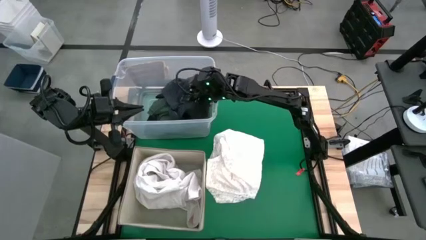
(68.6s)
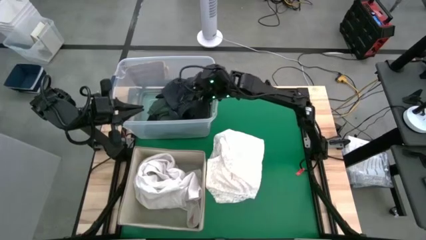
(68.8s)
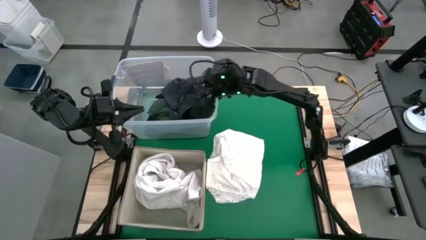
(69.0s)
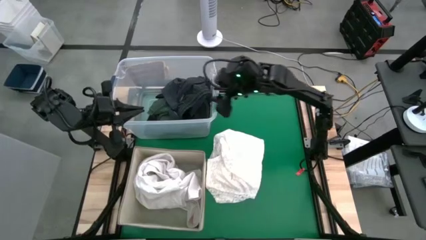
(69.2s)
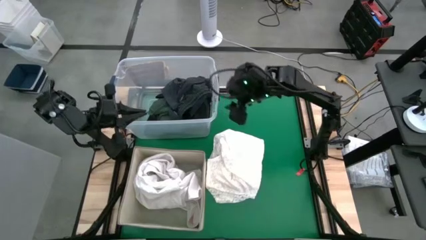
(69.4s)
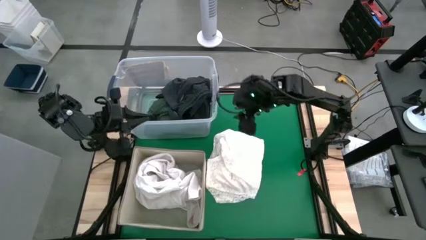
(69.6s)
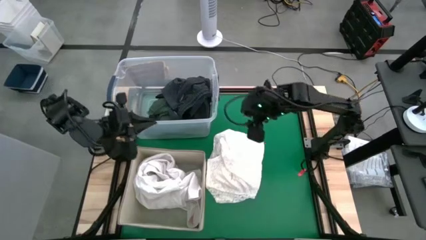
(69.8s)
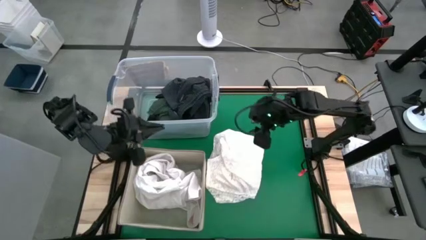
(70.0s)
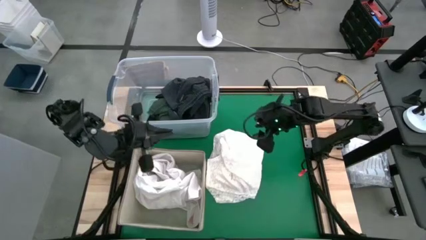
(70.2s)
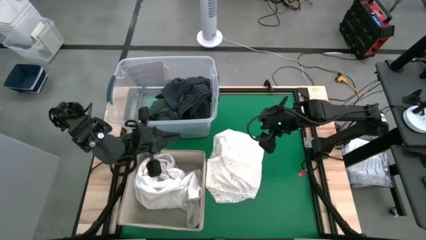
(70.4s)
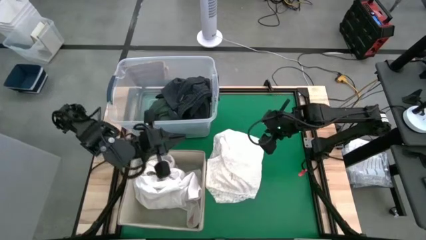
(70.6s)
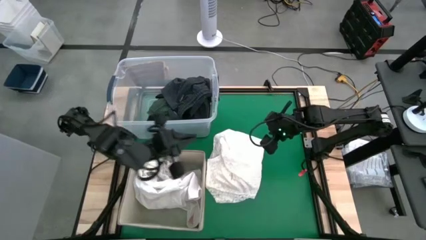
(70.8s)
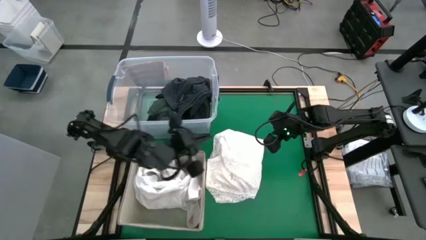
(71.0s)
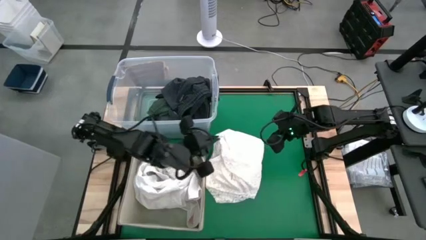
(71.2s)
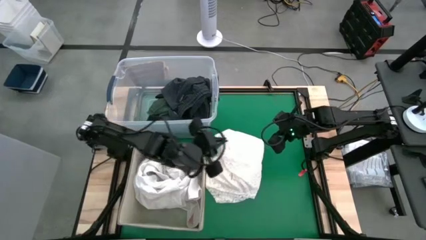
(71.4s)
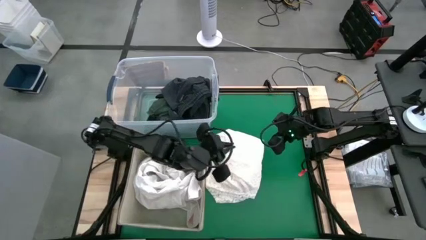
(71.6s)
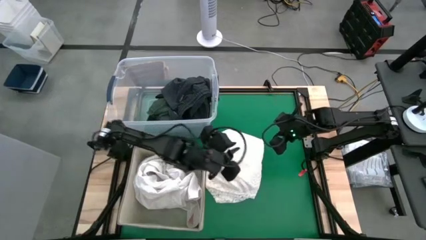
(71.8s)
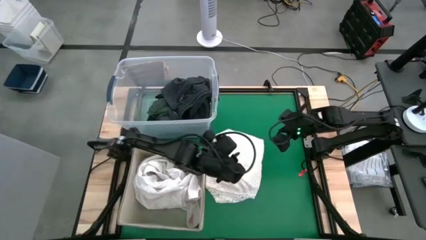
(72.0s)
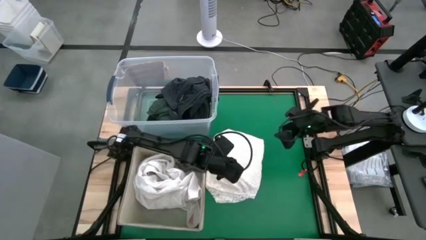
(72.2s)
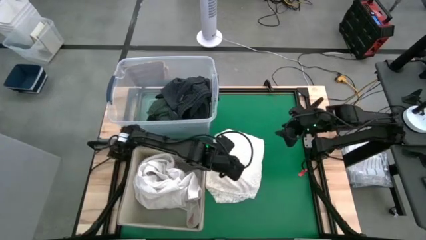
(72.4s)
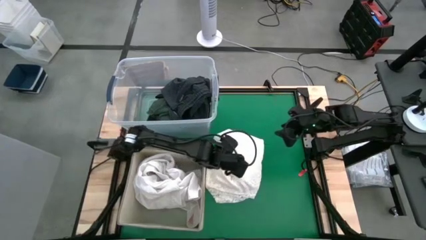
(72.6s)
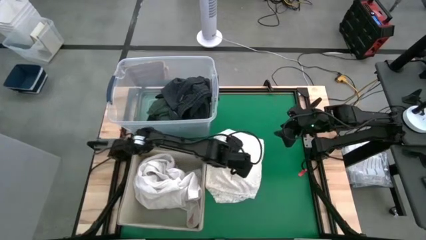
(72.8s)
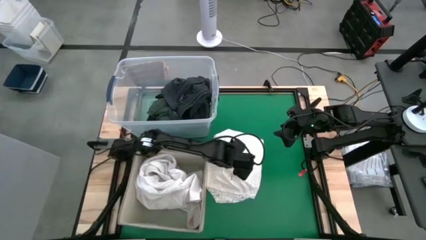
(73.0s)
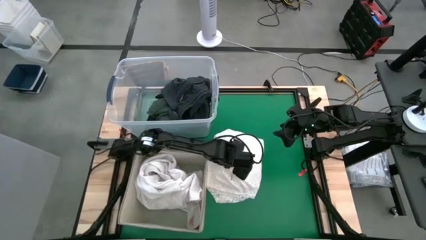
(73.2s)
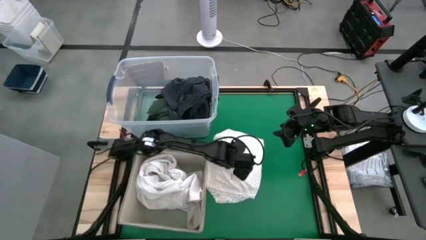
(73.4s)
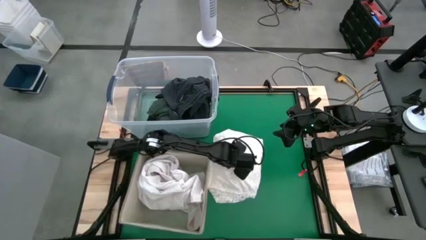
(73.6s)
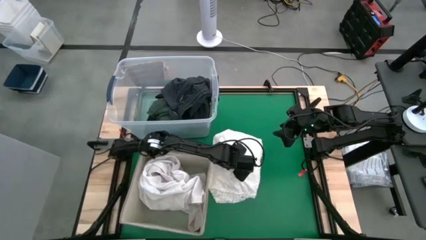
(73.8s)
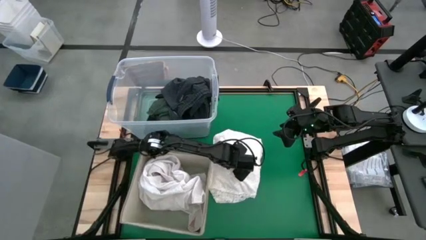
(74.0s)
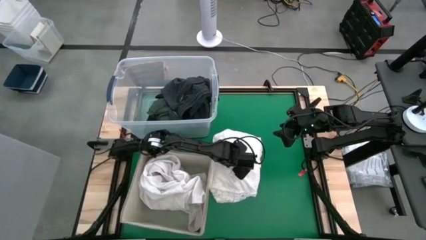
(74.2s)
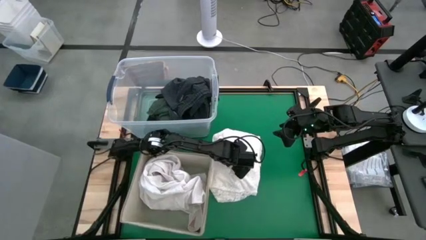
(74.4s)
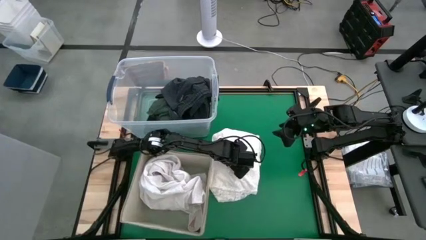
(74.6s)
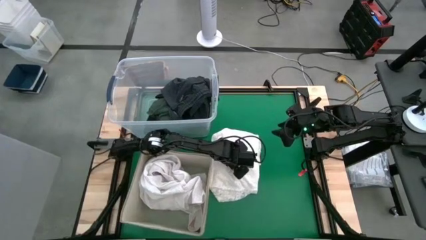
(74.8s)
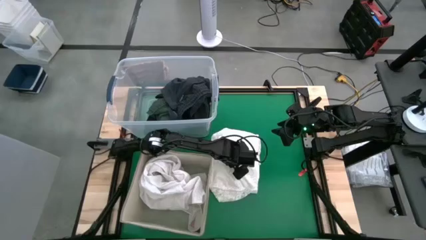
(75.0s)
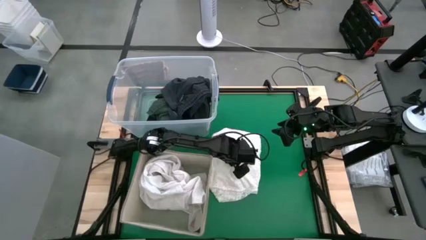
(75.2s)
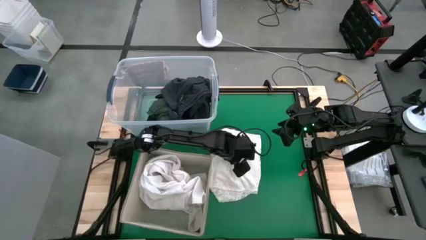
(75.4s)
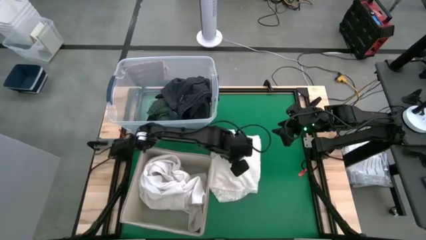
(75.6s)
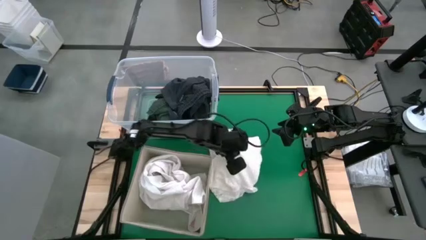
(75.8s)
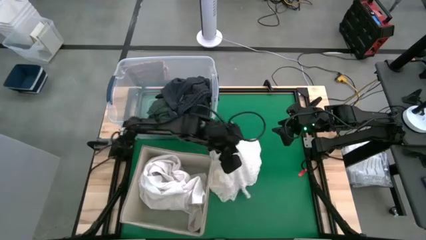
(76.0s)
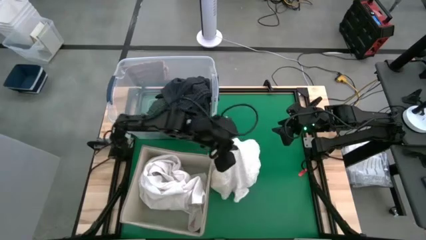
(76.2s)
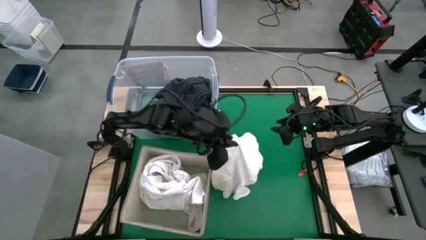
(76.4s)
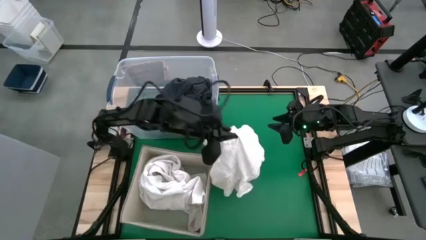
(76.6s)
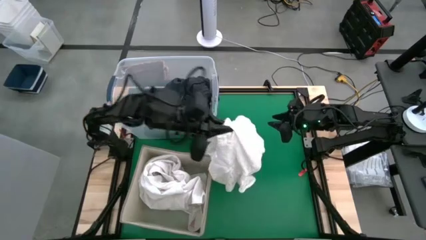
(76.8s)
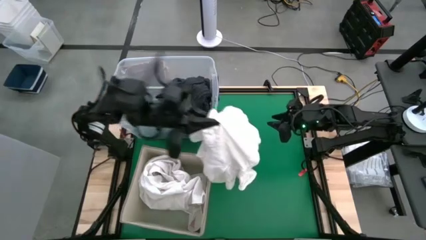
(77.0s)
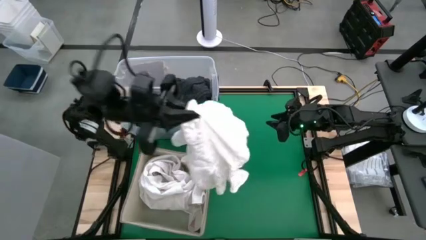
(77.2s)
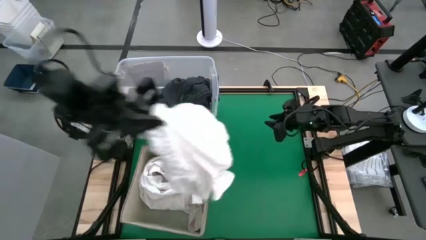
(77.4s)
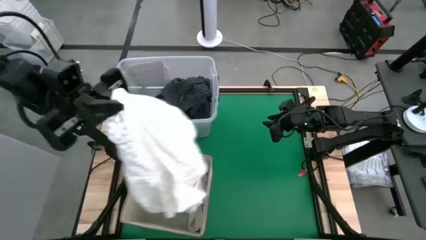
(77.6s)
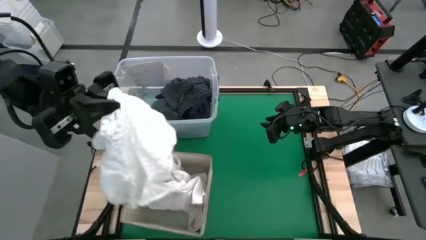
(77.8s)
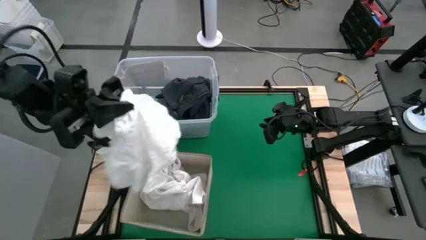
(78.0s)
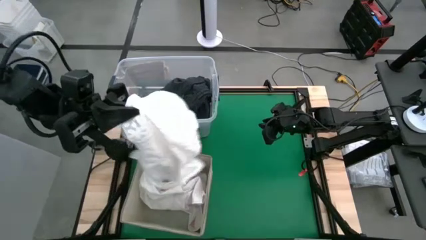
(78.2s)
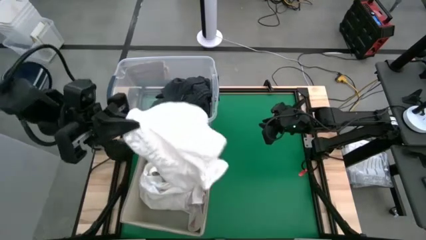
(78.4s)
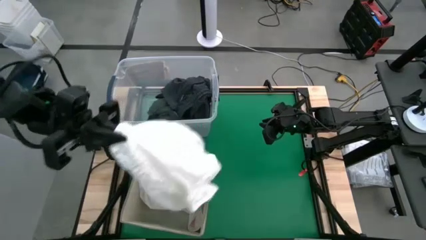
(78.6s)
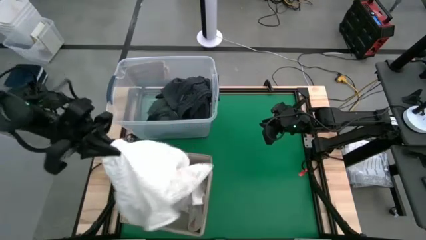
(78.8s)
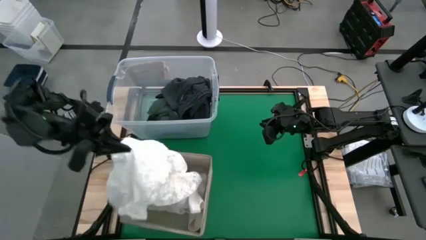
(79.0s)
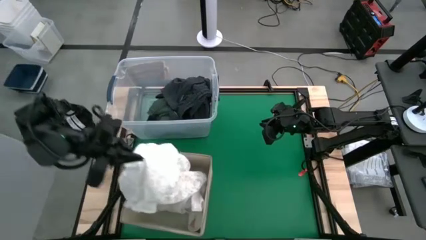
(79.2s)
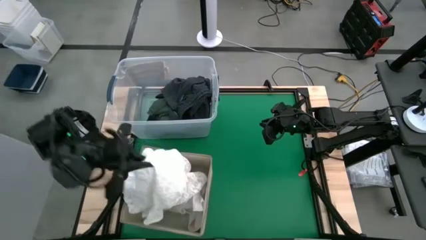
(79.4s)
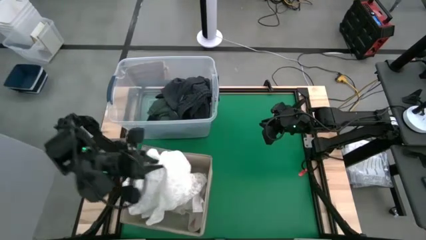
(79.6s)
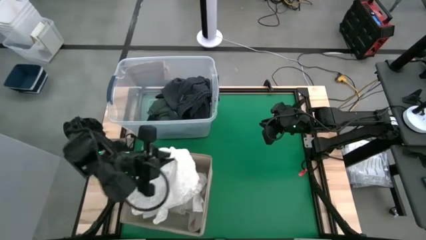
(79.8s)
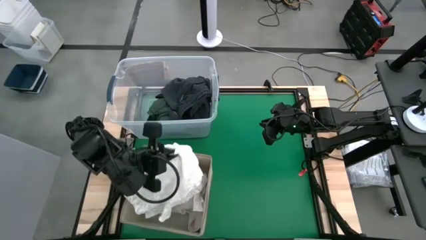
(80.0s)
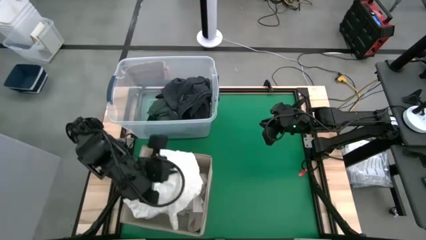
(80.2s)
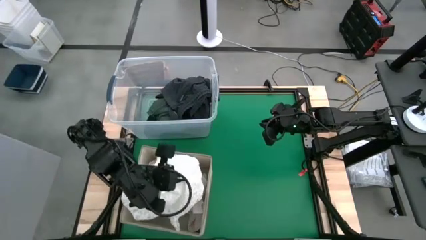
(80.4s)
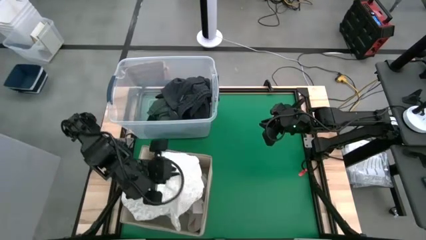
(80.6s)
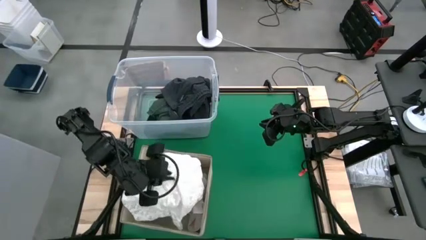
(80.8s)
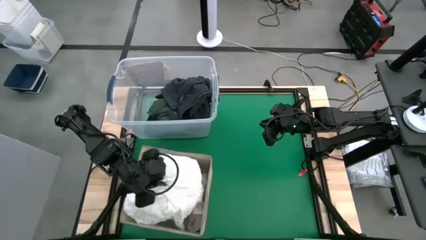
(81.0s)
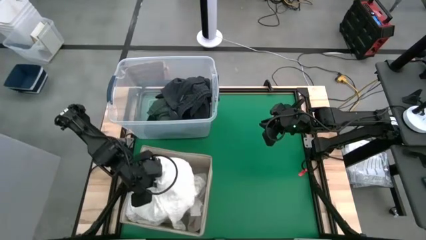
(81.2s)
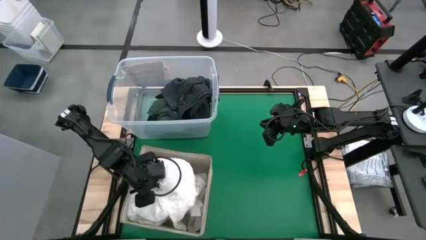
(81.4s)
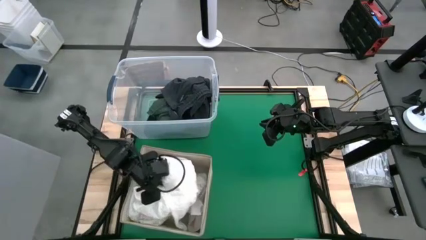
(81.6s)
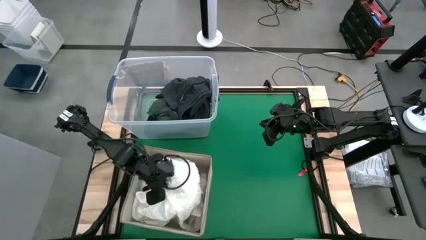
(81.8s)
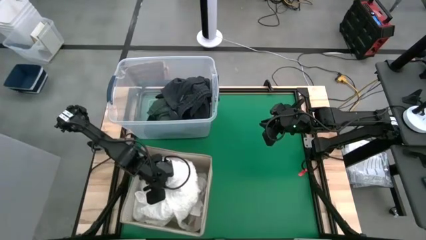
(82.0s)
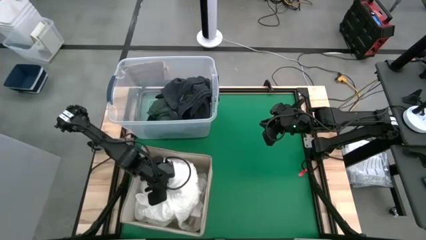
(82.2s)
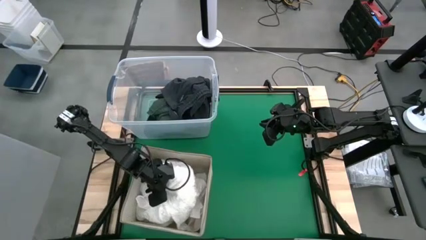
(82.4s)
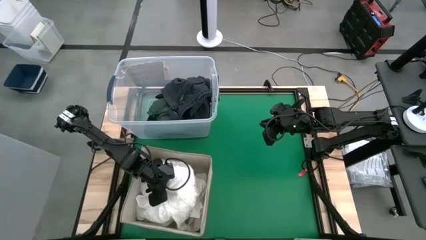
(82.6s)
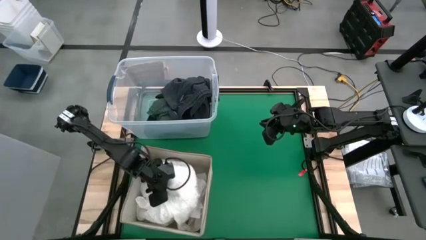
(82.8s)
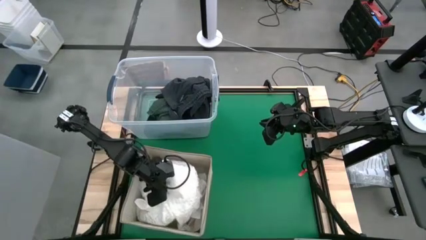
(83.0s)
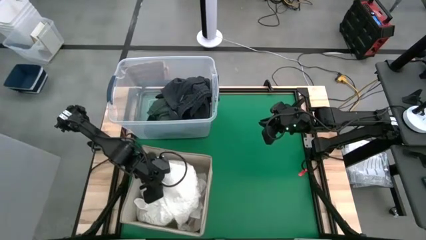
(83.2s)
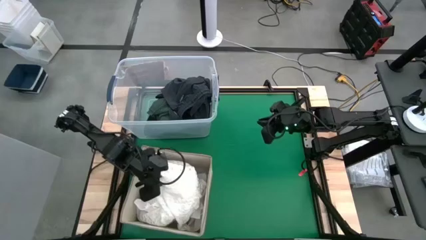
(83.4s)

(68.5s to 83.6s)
Task: Sort clothes
Put the white cloth into the brown bin

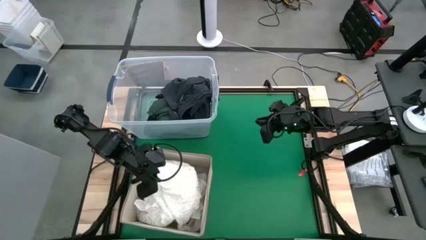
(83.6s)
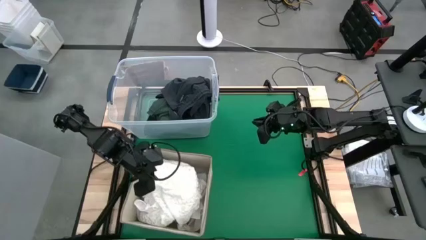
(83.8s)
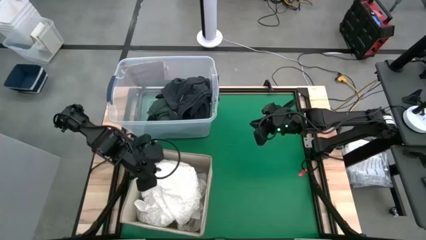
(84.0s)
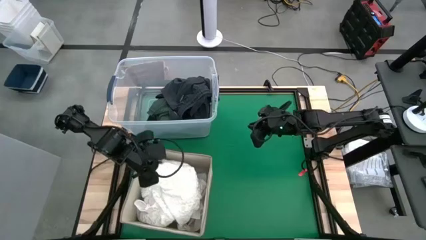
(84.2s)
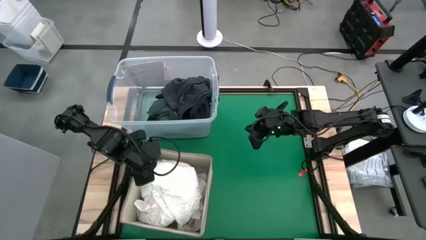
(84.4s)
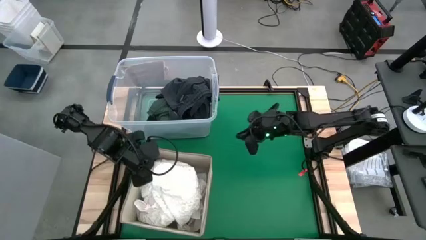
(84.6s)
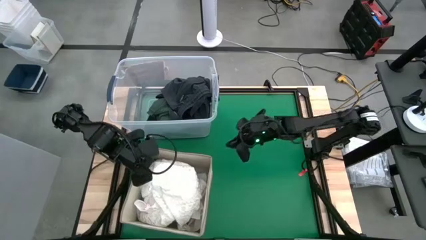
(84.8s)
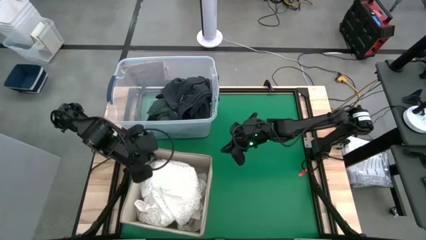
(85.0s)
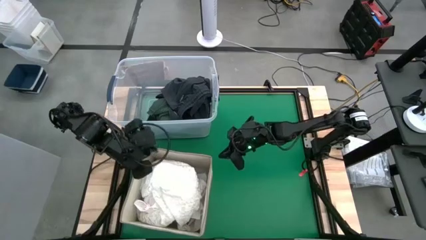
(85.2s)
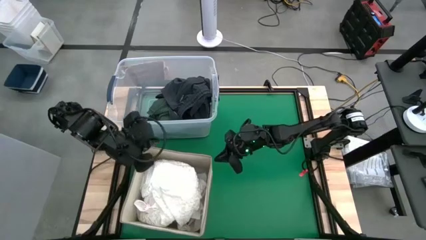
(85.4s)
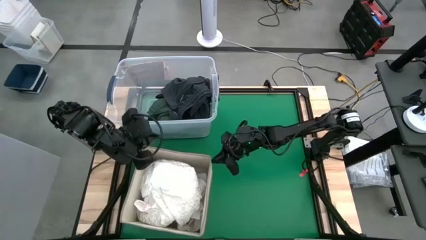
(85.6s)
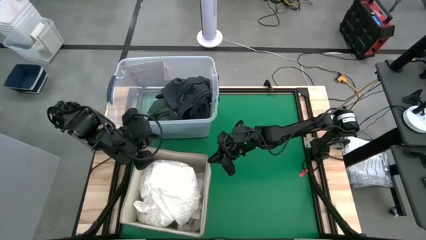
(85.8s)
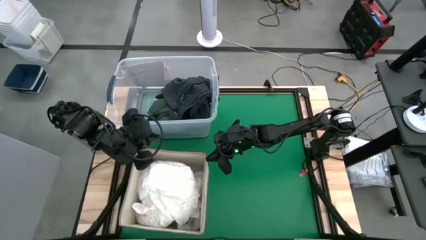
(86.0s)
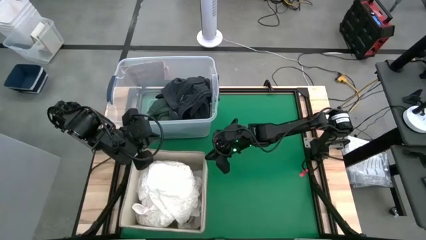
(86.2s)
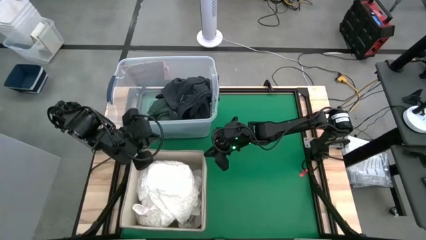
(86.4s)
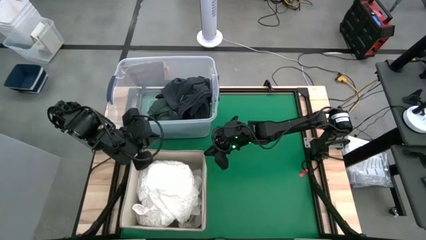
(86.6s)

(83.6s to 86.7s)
Adjust the brown bin
